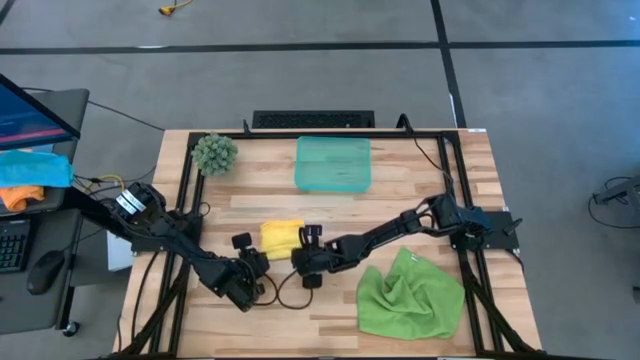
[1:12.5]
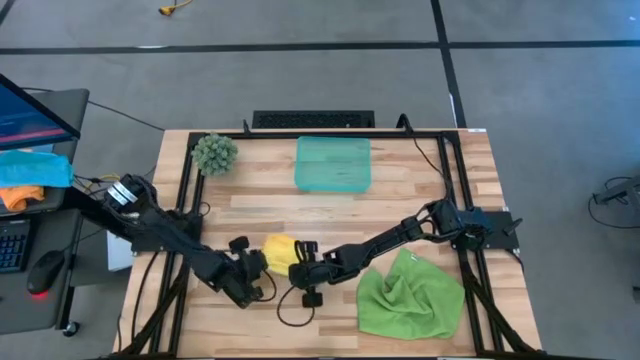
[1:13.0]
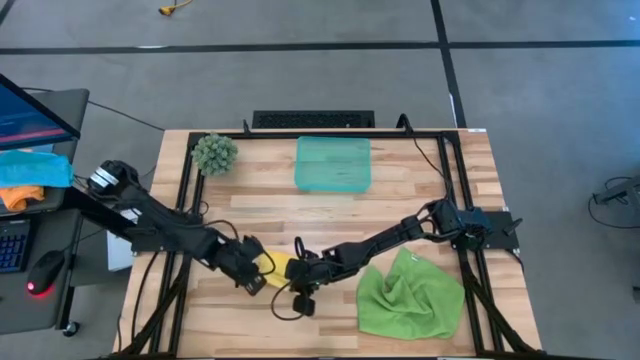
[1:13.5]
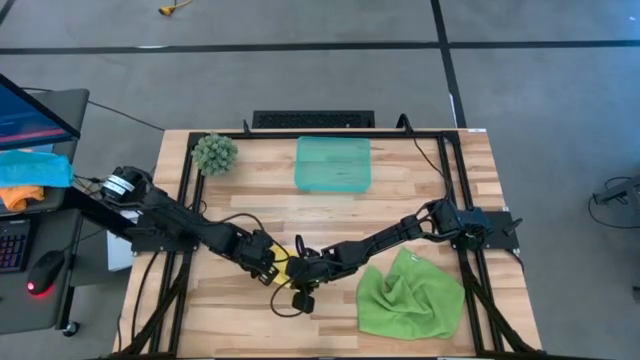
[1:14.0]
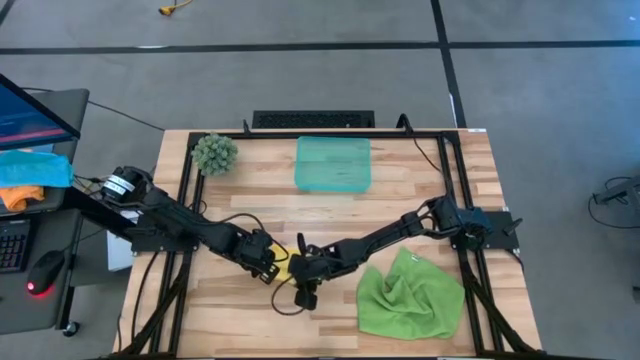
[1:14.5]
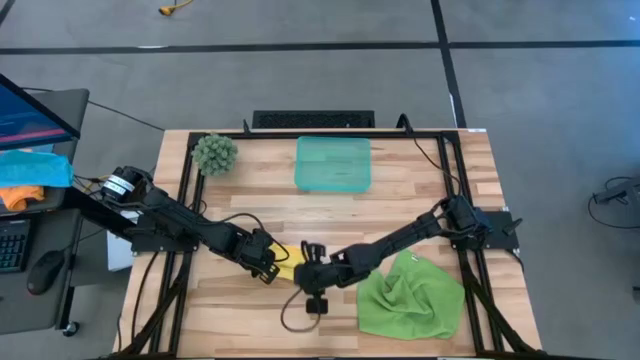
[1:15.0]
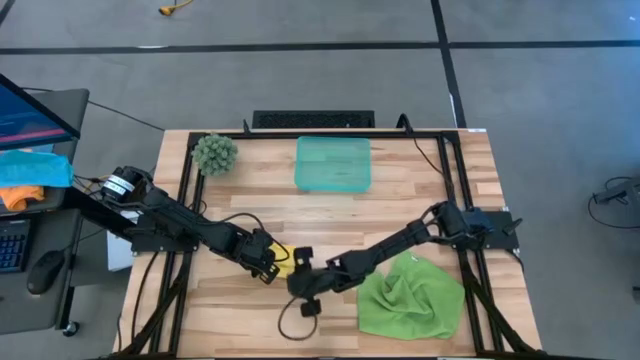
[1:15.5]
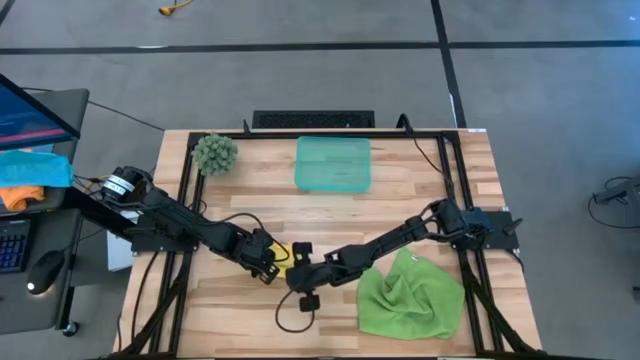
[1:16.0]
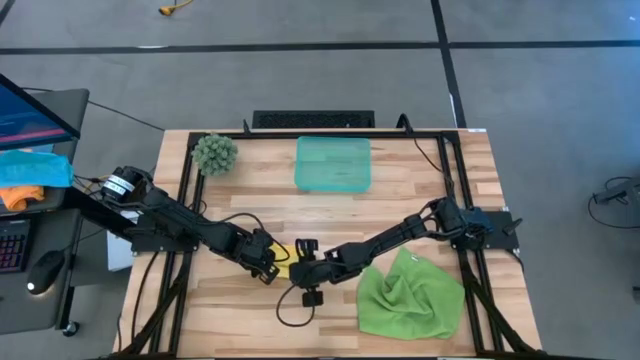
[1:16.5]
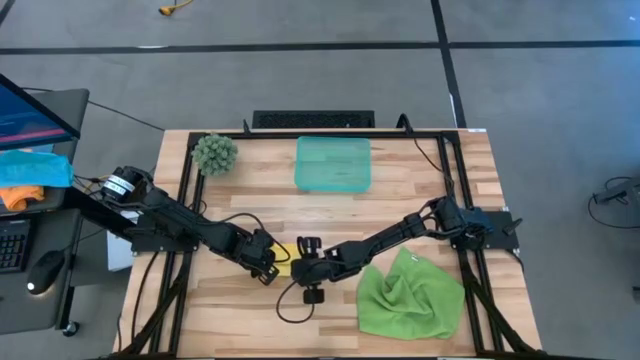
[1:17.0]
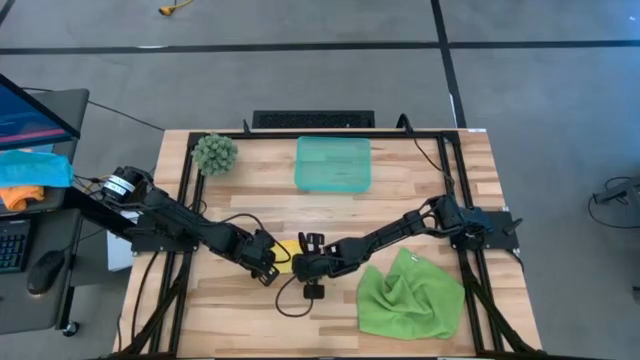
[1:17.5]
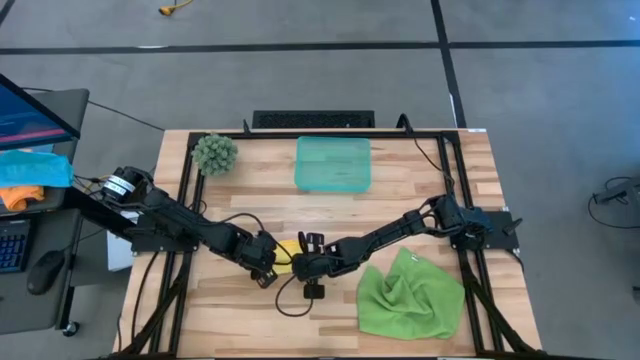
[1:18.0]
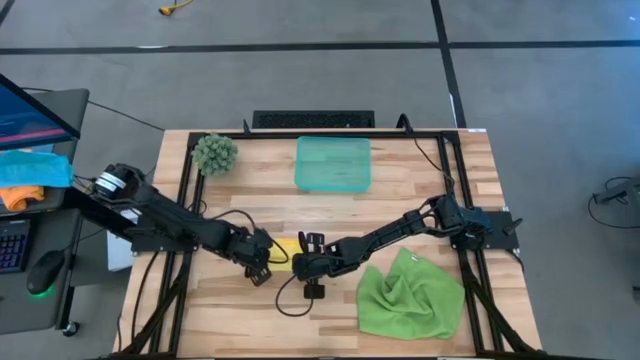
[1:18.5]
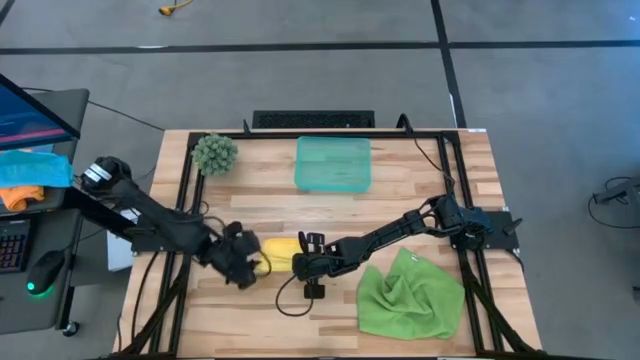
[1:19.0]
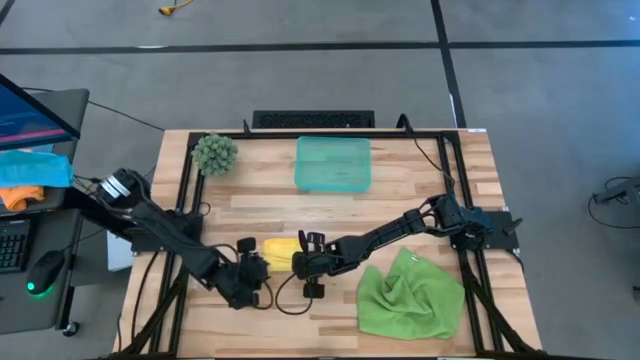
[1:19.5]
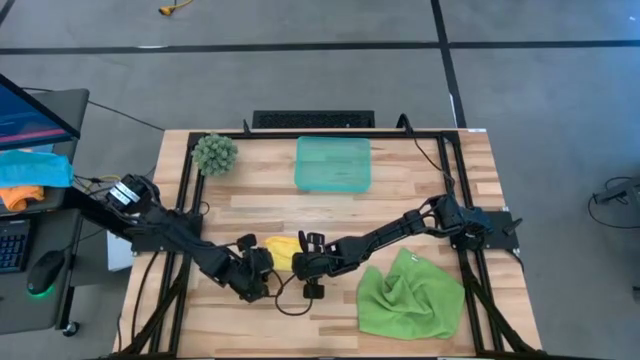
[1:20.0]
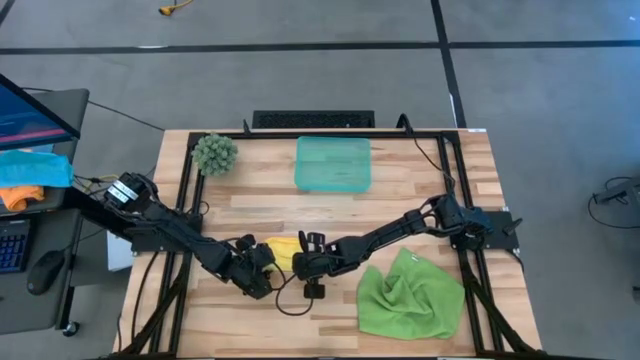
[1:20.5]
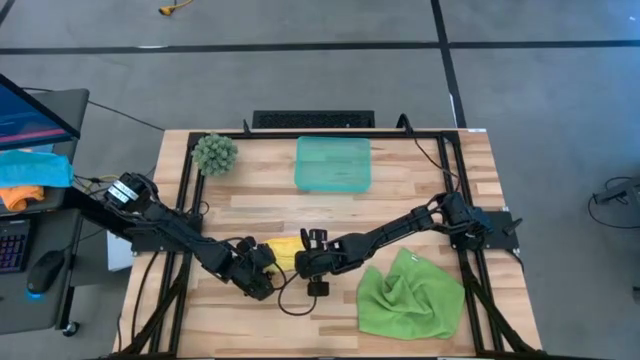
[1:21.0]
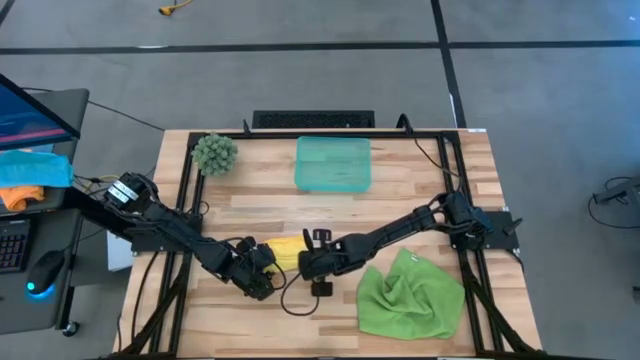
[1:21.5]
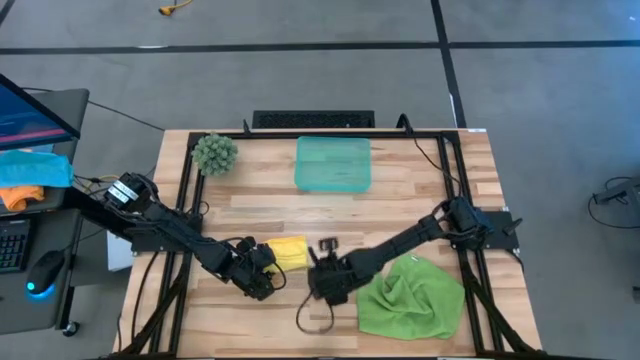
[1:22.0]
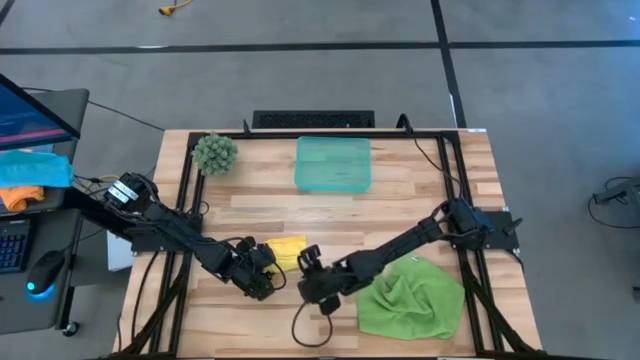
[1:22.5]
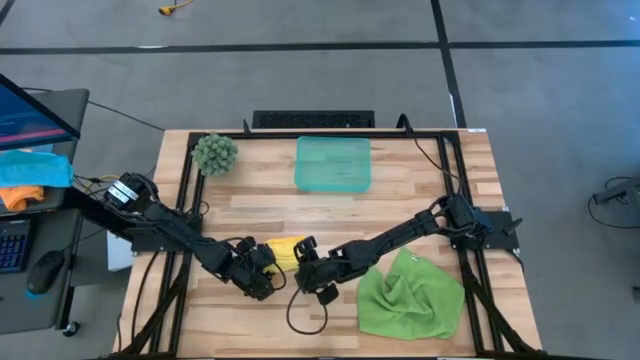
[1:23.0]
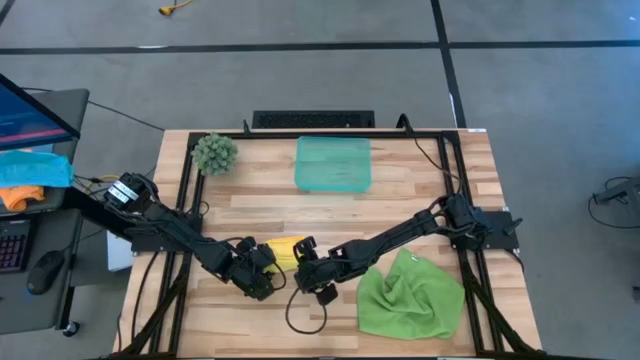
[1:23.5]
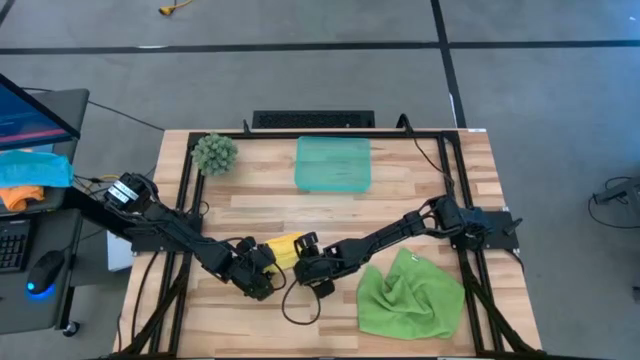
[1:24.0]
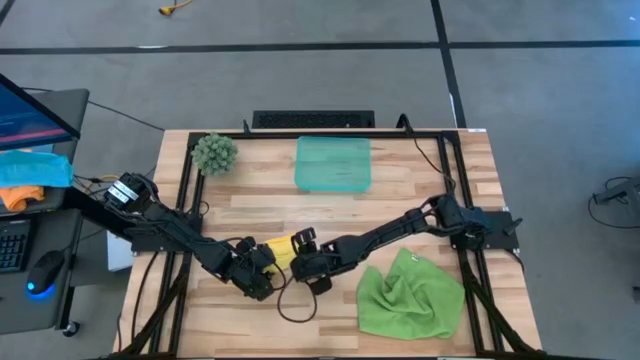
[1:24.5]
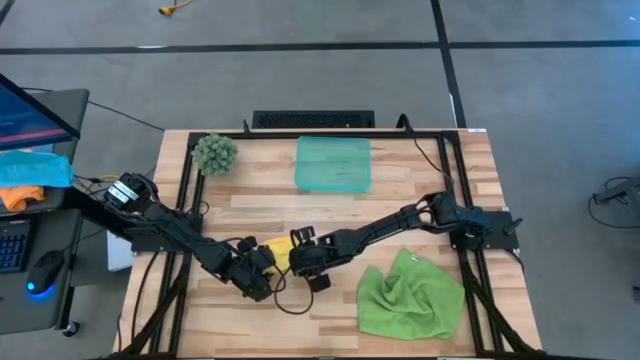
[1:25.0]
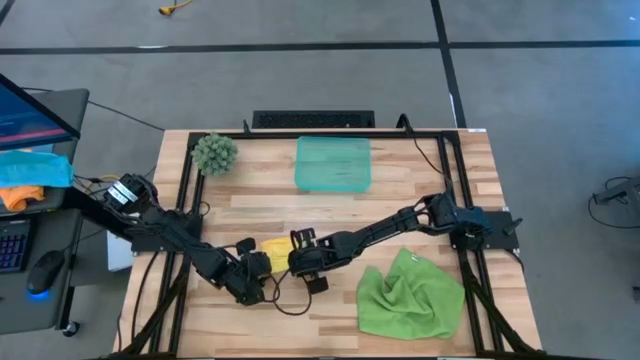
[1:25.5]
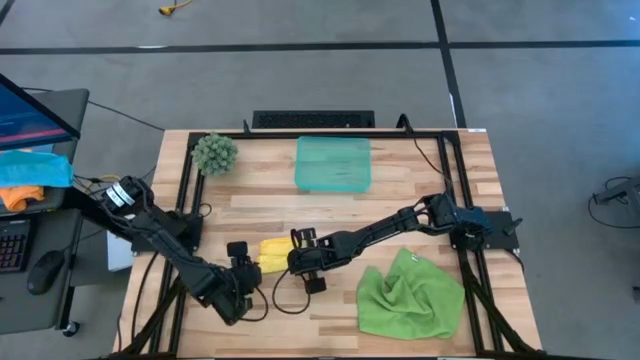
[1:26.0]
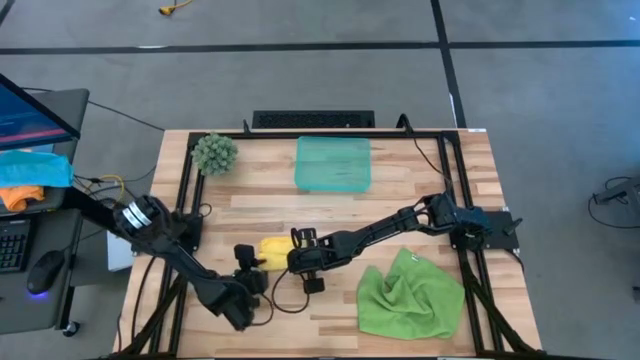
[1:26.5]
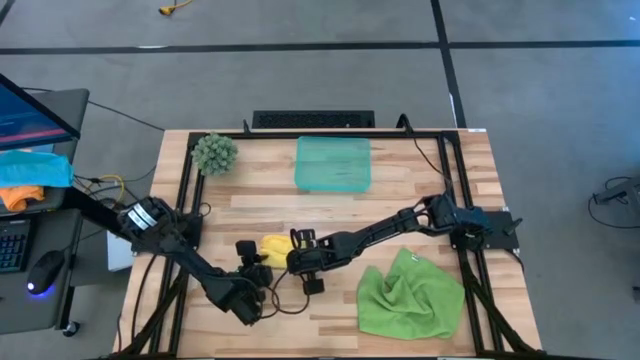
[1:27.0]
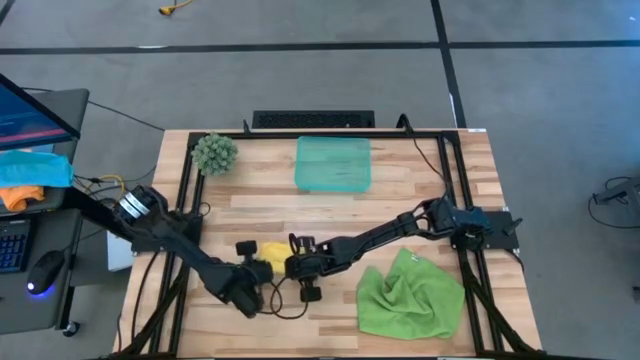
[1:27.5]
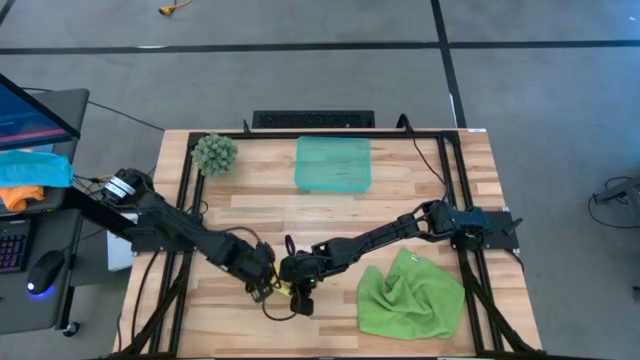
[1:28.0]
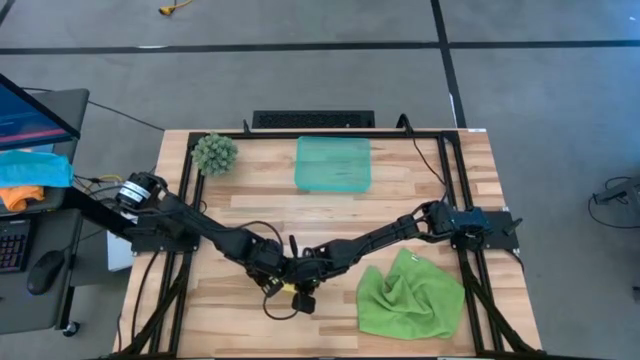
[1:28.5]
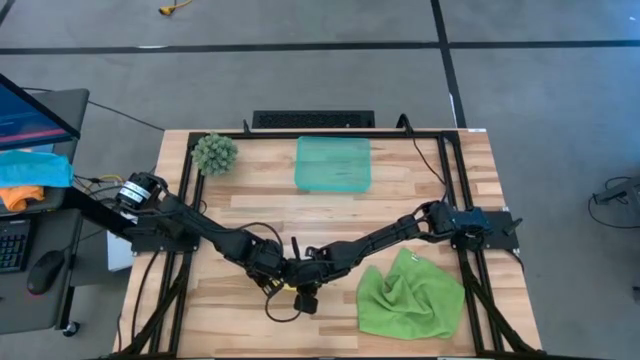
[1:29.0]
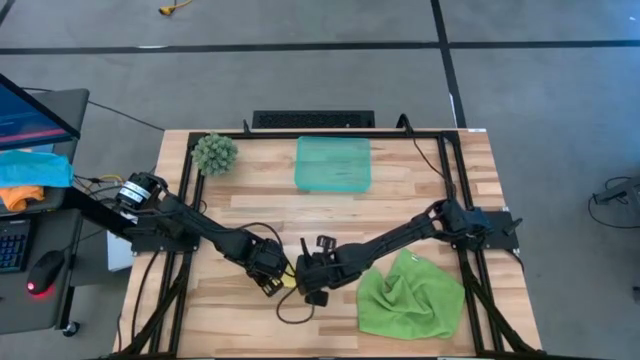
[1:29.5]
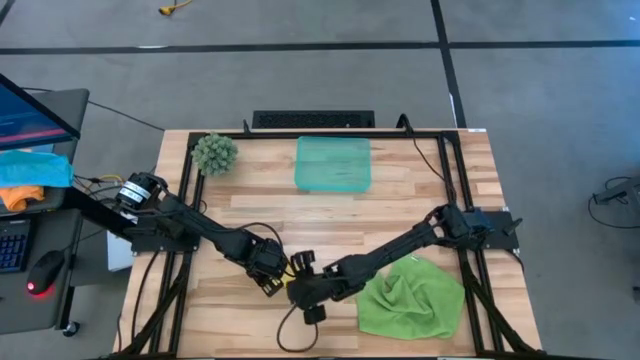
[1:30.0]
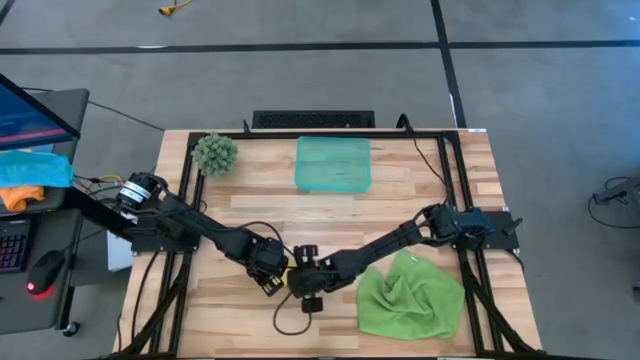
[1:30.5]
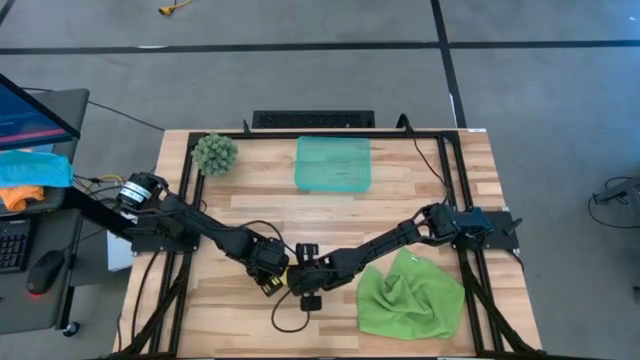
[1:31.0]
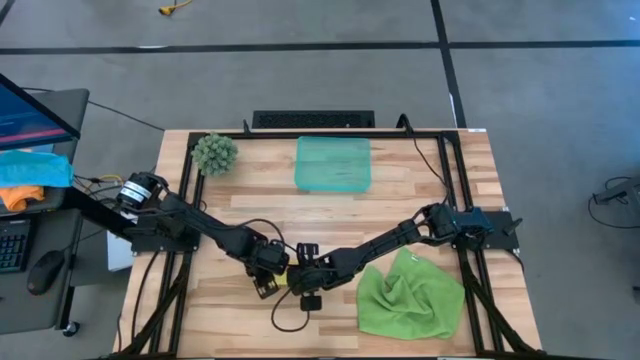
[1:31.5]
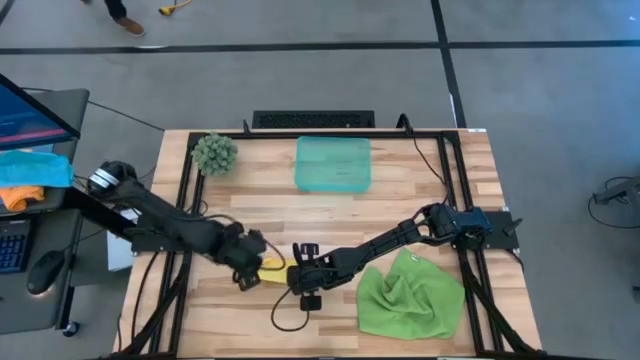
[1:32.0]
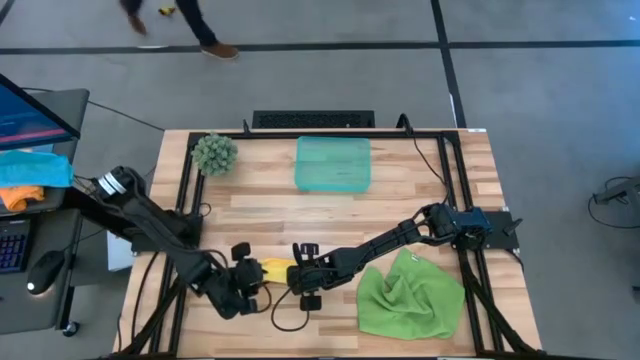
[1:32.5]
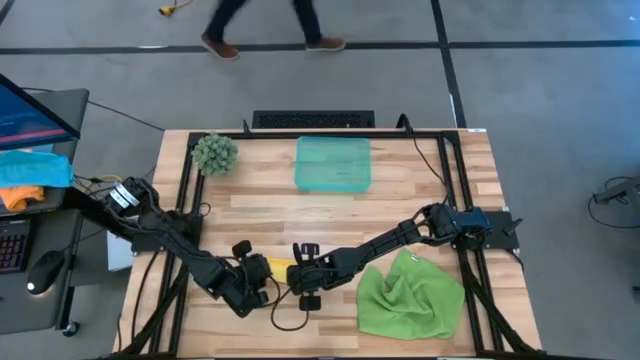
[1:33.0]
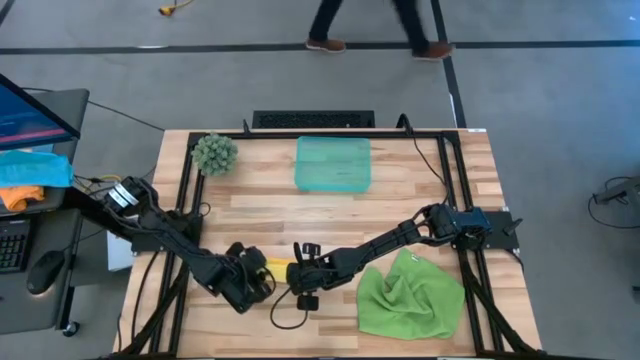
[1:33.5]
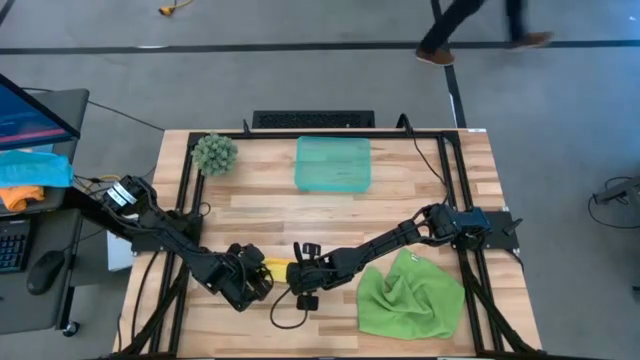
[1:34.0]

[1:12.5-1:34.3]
Task: Roll microfiber towels into tight, uniform cylinder then place into a basket
Roll the yellow microfiber cloth
